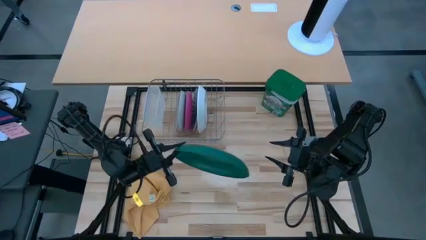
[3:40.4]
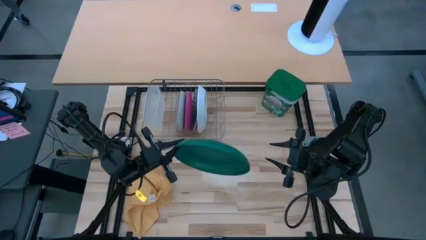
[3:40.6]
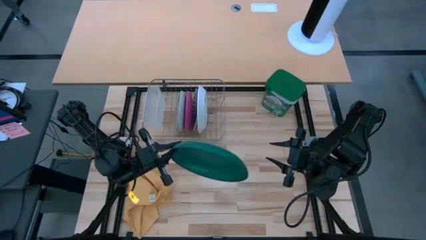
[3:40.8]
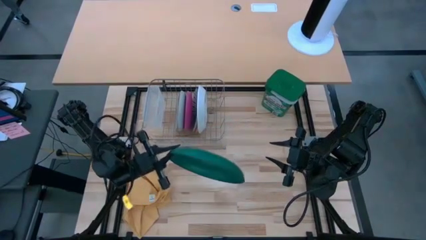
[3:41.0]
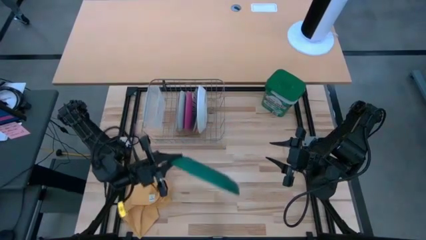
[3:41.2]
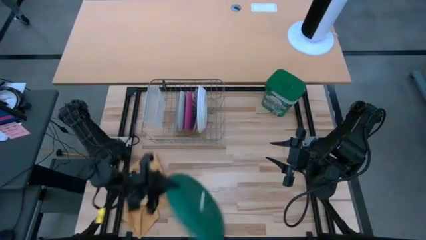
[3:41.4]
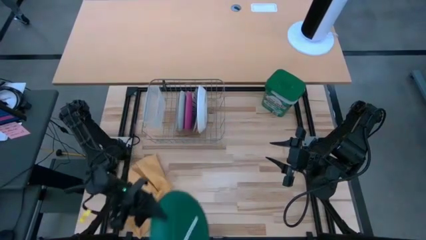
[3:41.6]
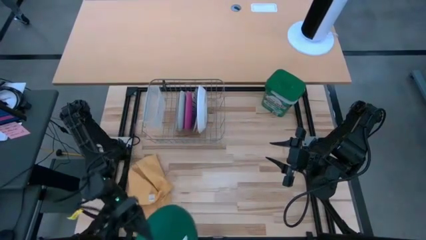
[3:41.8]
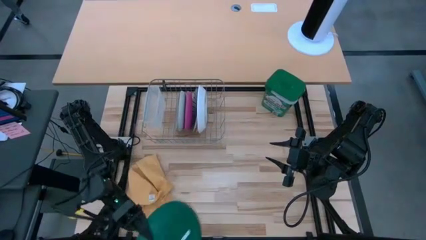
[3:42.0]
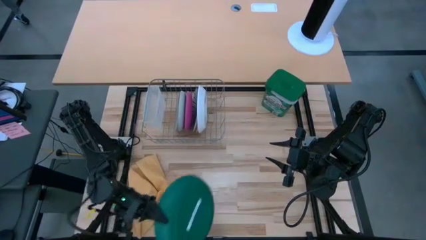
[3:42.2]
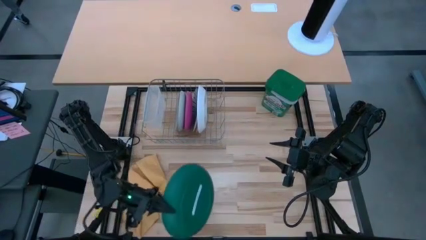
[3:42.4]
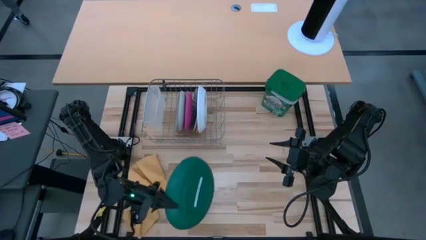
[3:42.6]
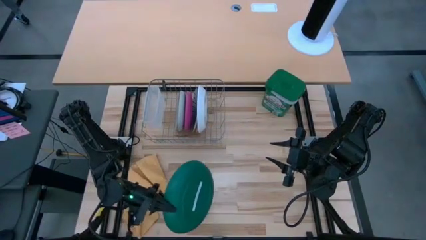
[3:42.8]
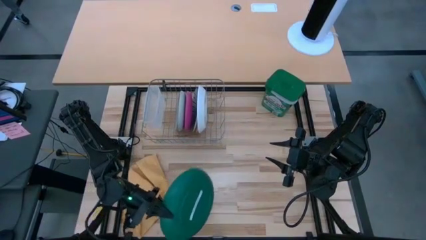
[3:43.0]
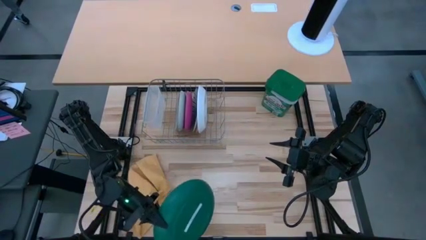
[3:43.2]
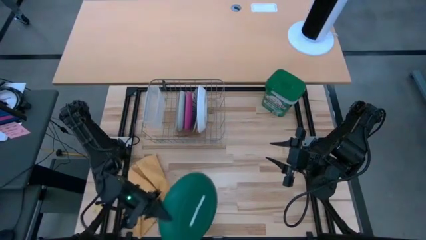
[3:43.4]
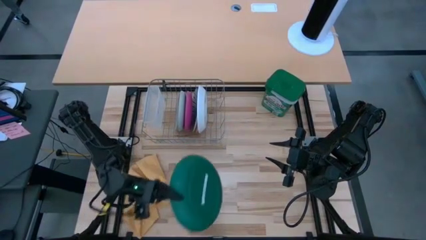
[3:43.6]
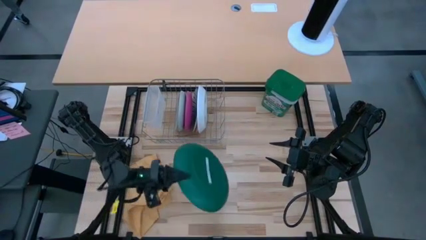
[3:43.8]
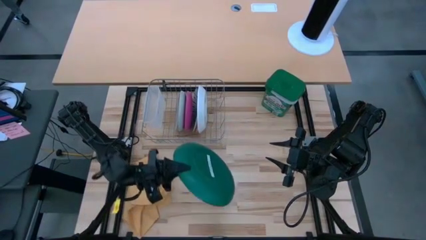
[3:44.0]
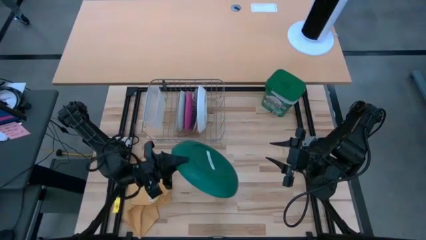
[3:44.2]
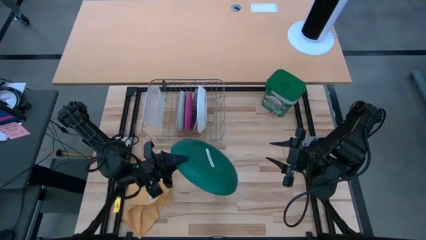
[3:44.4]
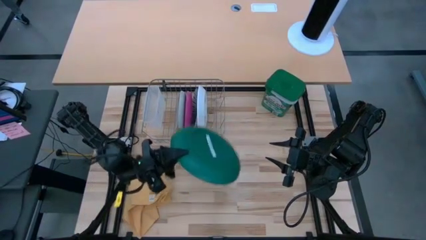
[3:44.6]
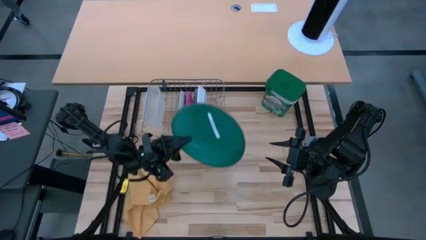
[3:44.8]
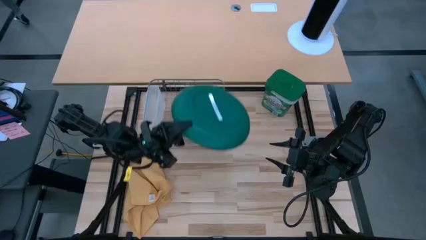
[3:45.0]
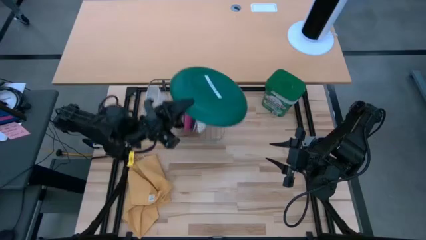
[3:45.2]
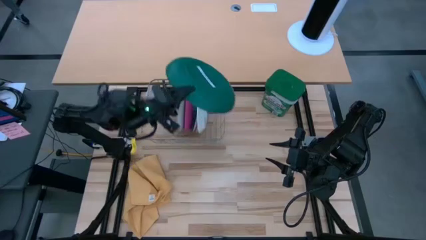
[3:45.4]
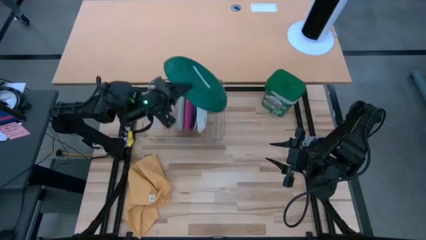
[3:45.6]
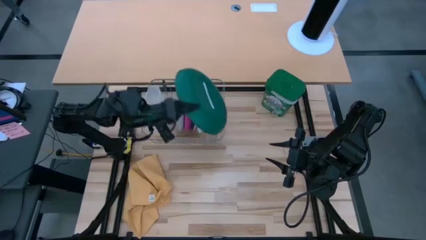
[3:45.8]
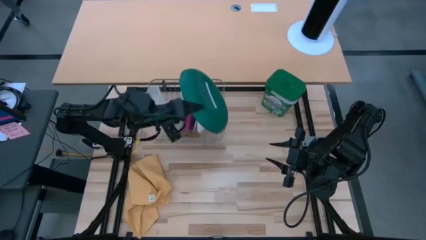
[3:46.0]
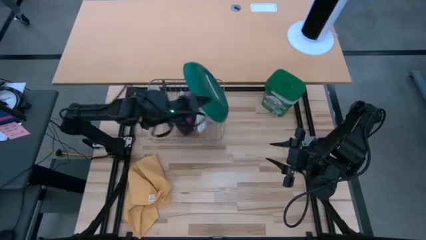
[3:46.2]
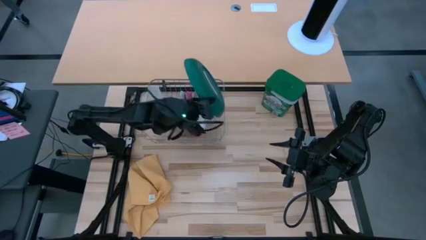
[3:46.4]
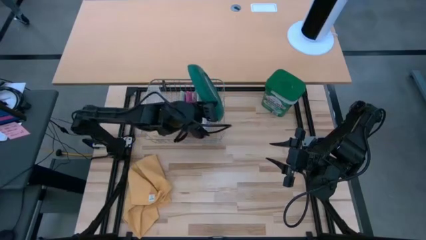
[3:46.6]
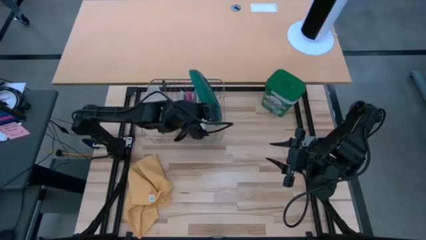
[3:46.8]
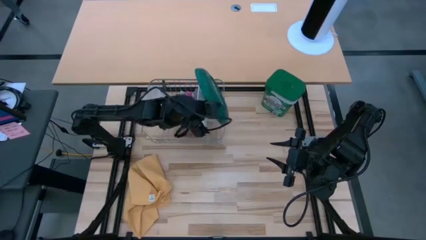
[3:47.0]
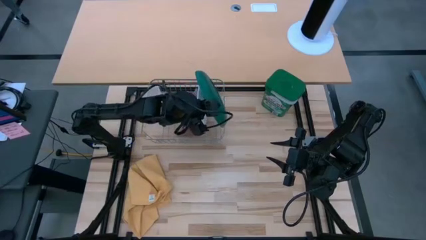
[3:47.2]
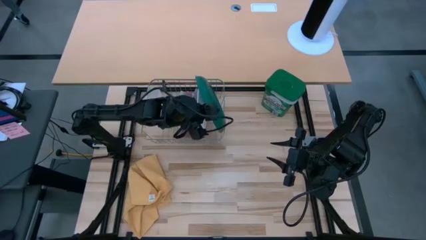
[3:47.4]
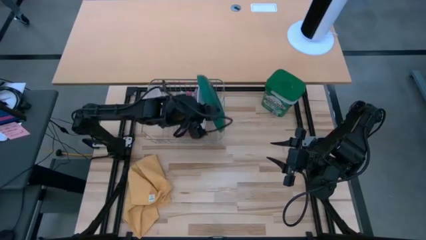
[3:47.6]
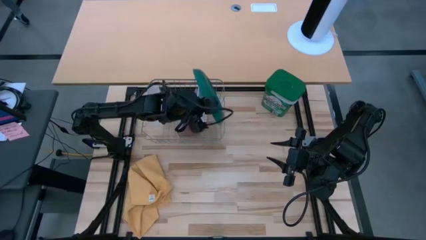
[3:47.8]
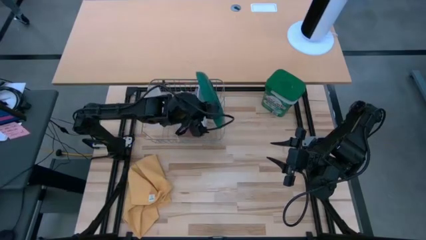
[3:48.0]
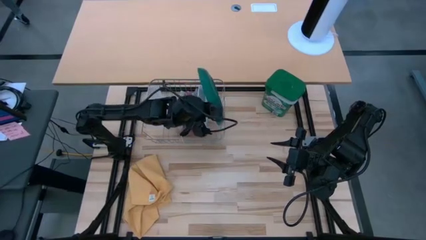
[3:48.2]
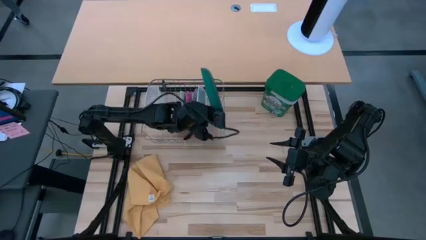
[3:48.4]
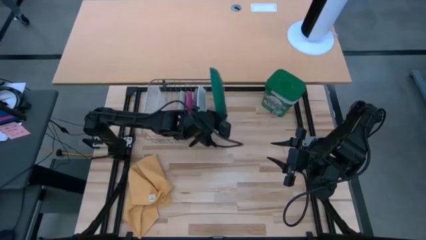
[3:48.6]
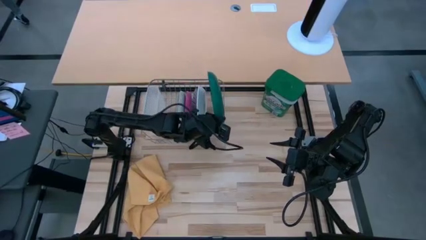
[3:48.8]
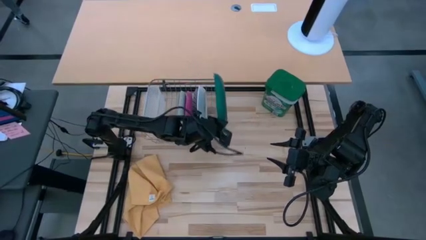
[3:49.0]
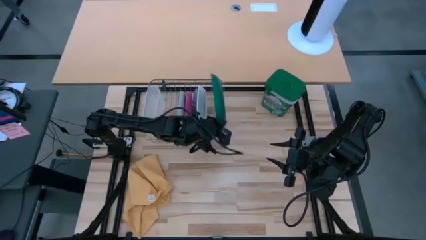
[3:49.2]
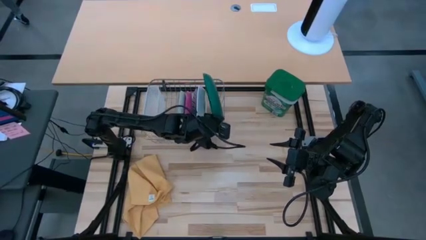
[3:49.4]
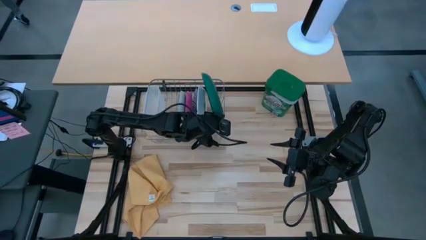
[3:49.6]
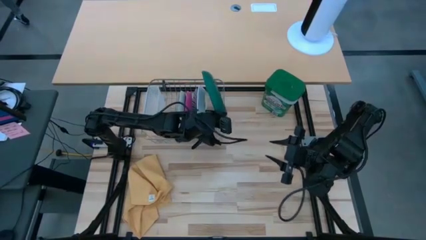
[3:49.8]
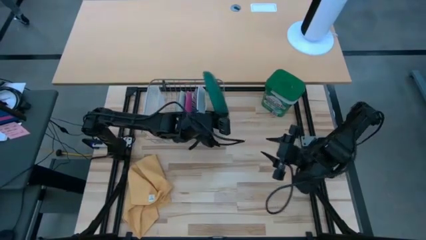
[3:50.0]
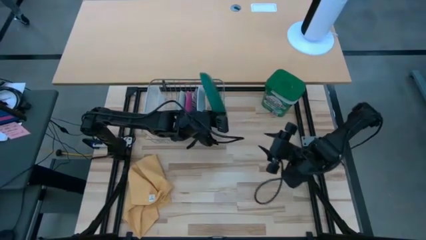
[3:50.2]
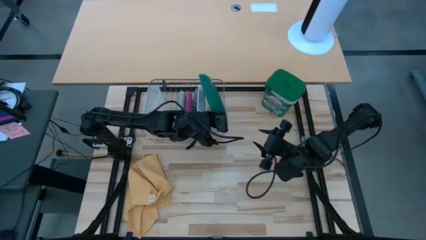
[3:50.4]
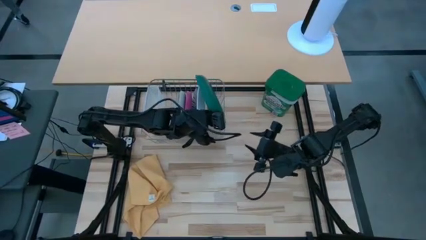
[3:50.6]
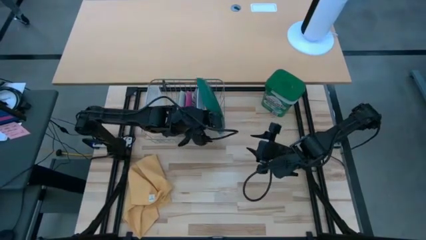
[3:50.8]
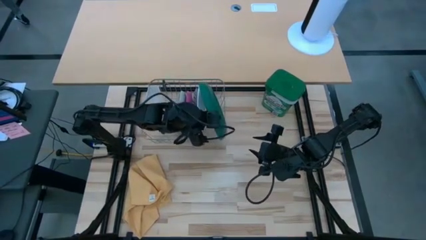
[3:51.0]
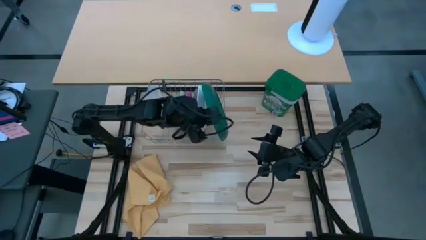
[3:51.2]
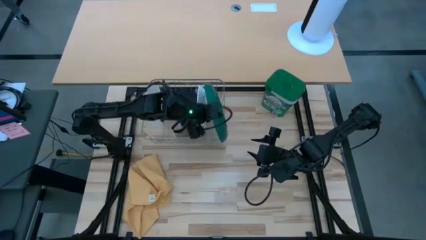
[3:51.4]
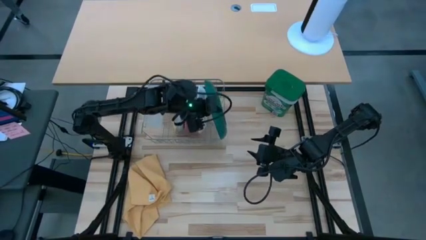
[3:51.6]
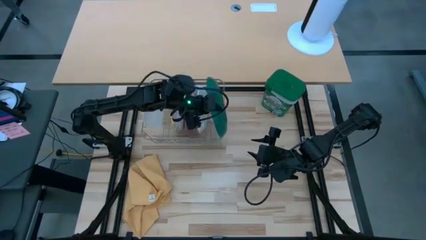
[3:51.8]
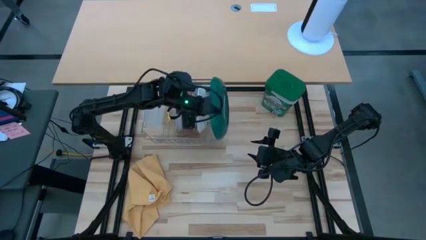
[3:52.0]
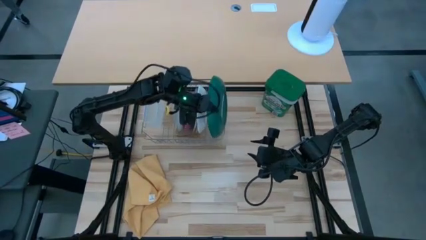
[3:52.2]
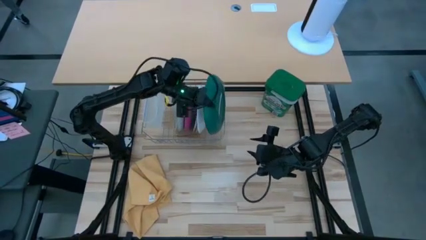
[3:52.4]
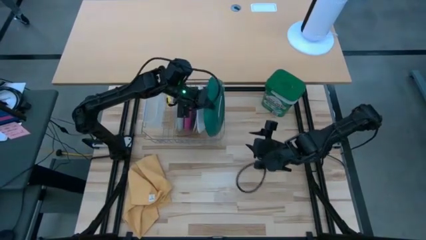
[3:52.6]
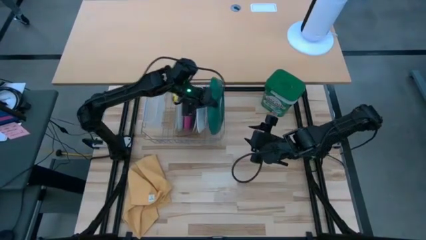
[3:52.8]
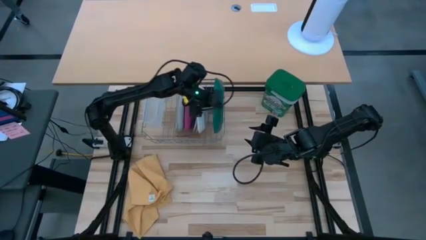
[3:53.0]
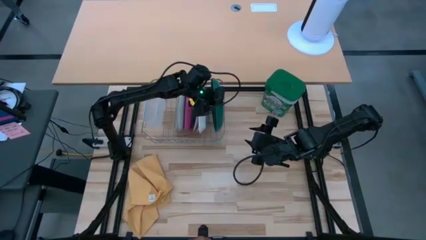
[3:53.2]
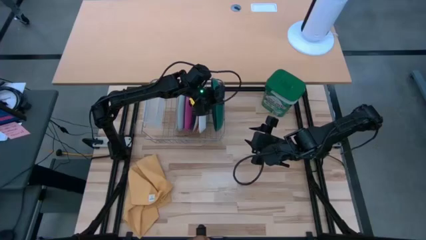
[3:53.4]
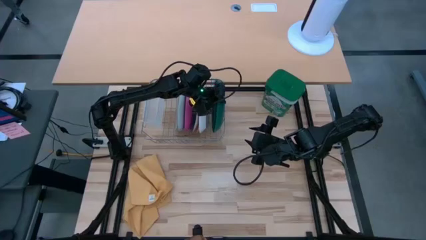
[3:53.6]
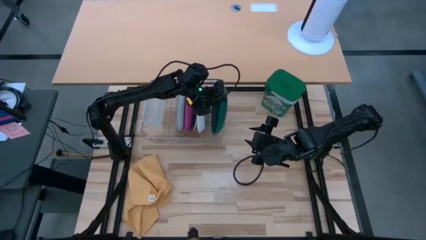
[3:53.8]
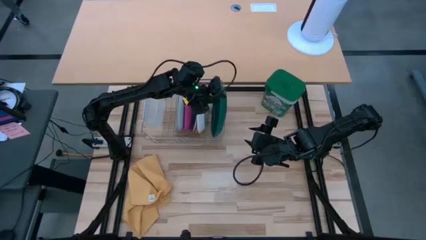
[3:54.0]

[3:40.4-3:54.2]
Task: Sort dishes
Put the green plate into the dish rack

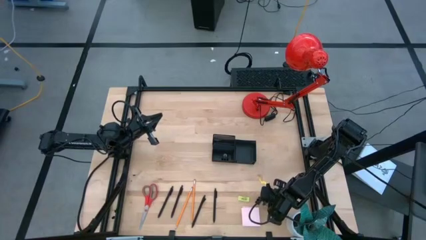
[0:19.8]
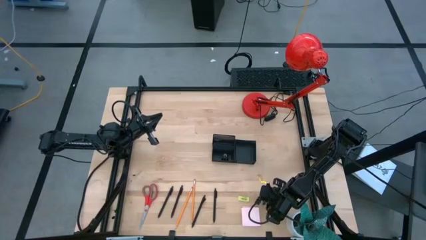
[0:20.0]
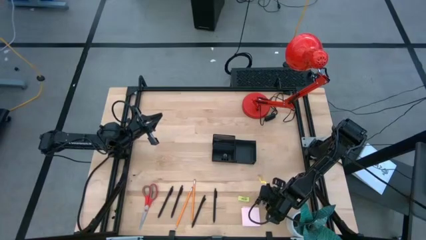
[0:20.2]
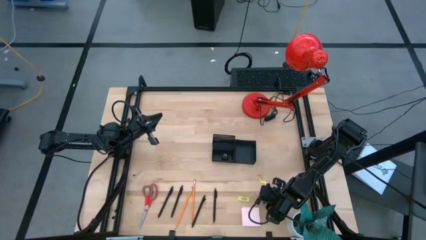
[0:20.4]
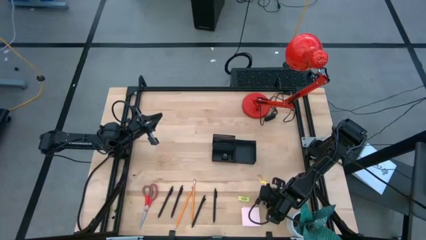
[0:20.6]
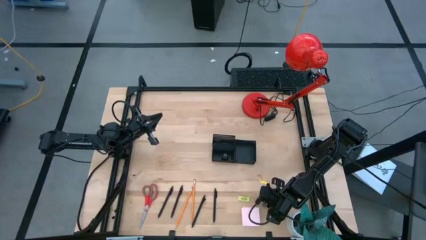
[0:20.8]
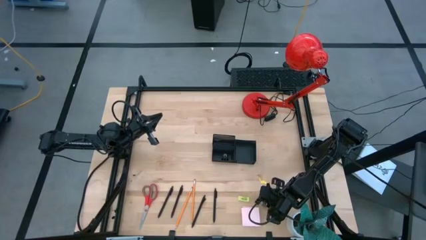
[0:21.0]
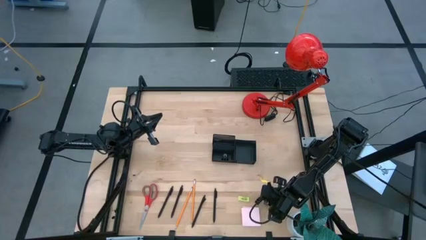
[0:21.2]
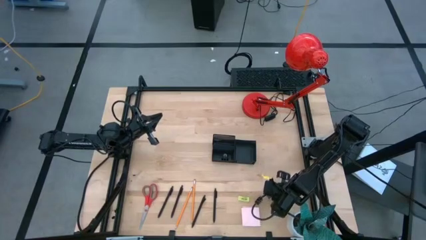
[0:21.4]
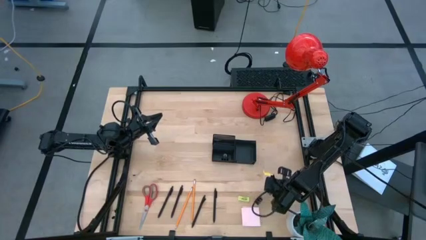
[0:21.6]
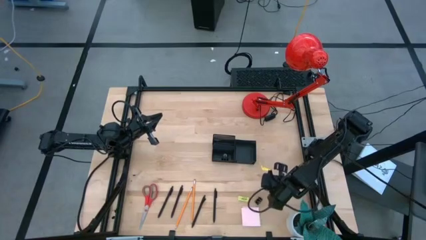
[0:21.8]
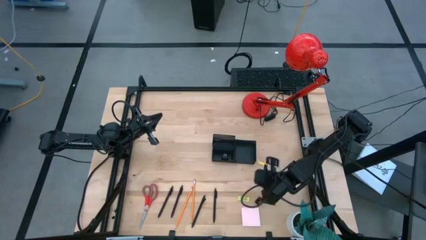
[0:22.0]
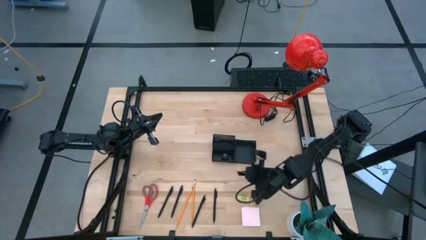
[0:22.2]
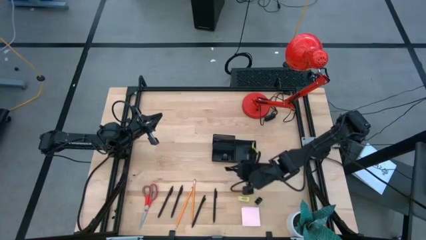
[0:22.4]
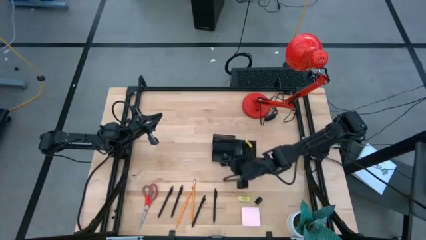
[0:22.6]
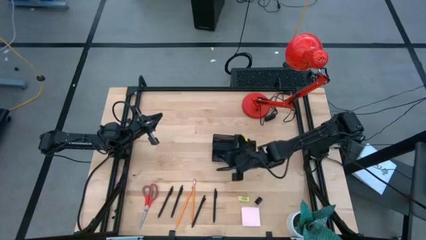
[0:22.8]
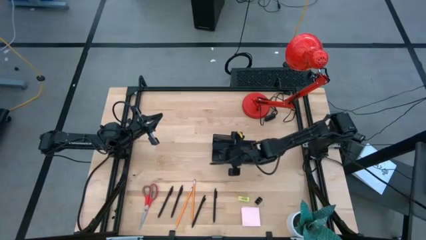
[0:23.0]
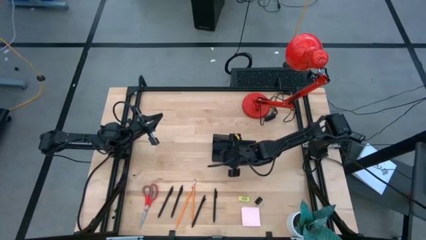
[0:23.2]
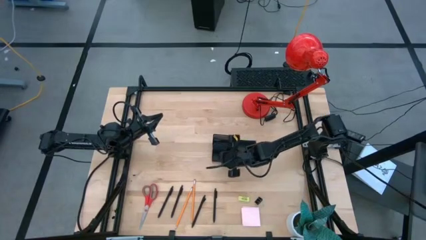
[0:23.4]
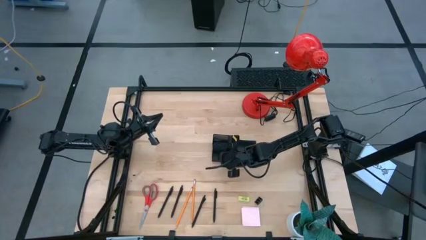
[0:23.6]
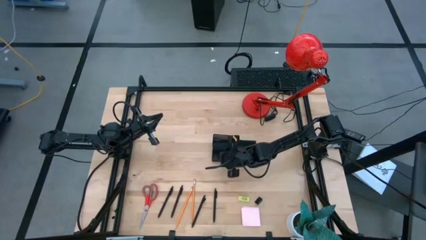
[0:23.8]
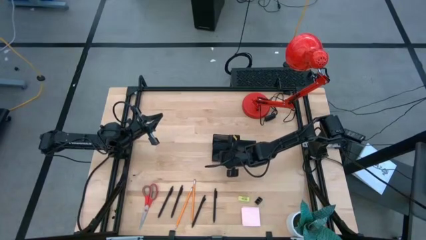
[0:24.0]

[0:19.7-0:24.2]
Task: Pick and place office supplies into organizer
Put the black binder clip into the black desk organizer
